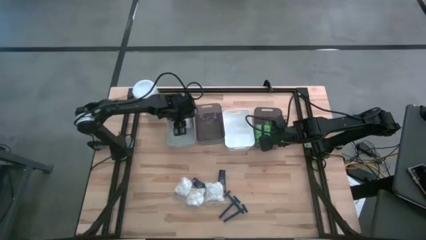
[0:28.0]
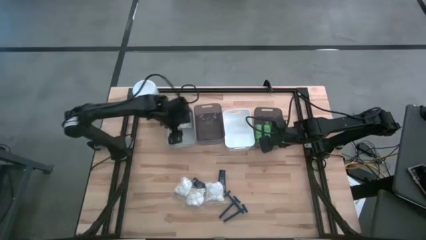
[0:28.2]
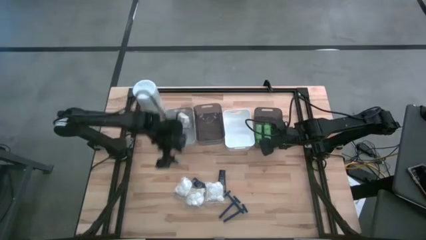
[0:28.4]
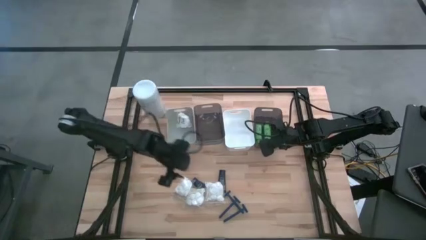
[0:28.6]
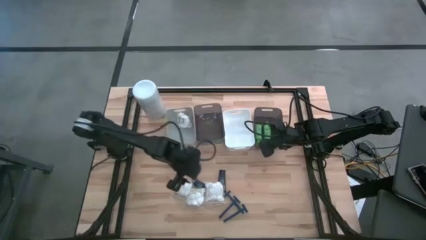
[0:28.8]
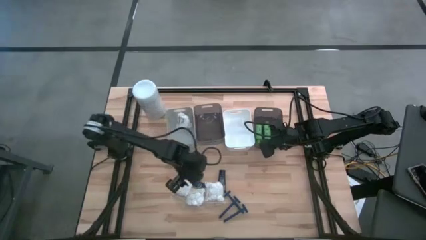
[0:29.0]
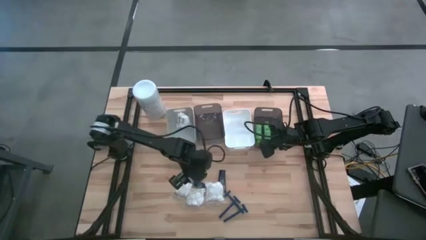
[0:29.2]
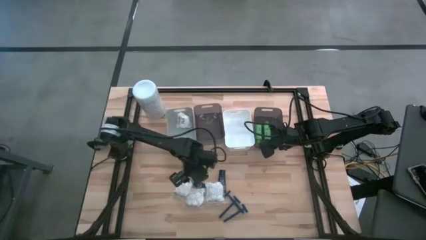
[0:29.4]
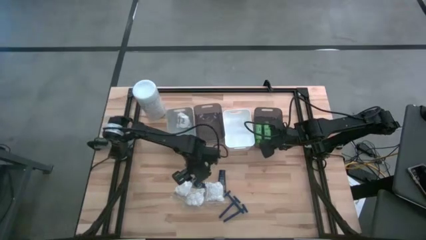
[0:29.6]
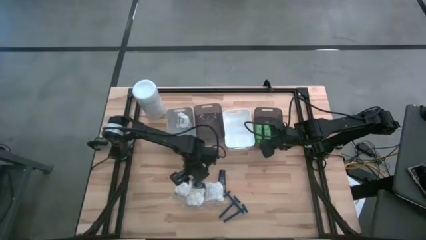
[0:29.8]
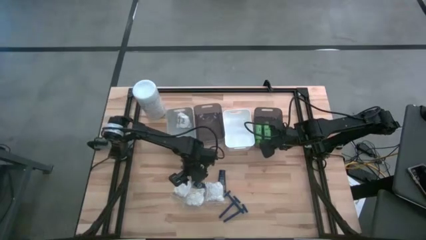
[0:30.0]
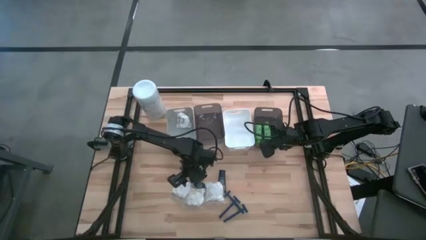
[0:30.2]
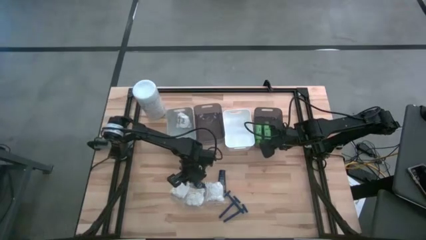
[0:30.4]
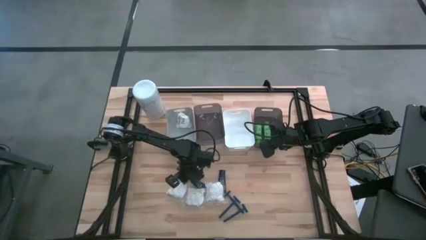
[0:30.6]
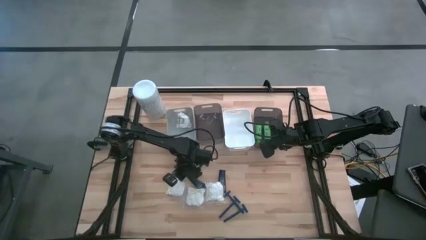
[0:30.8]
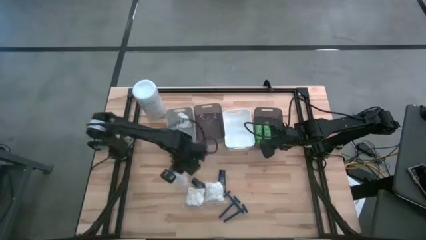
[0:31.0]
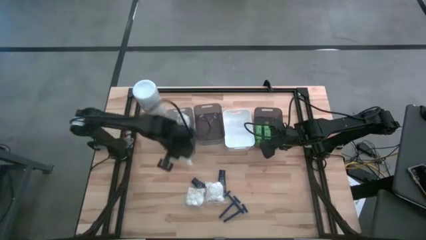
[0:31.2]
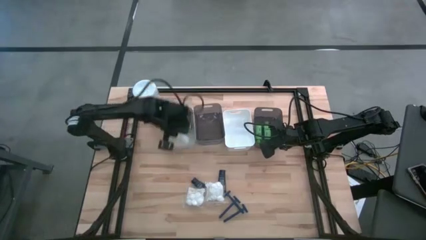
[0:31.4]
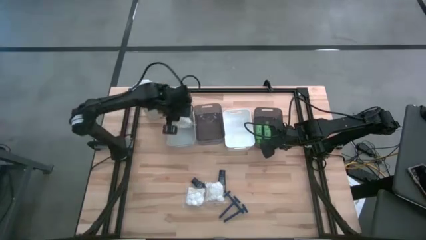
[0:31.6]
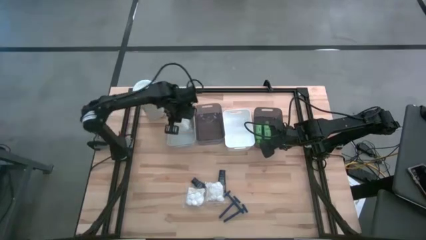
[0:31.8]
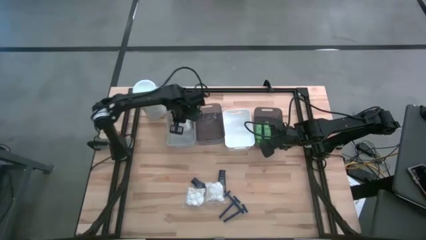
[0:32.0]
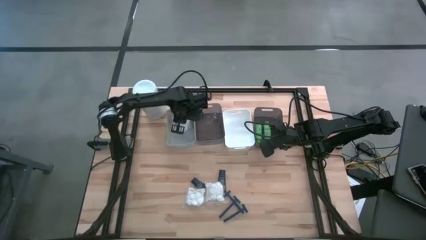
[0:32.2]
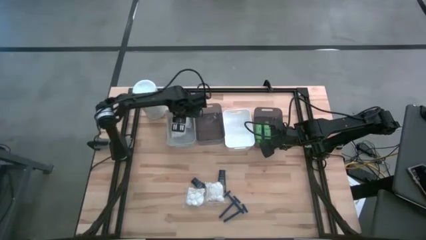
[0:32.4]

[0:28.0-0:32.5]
Task: Pick & Place Travel size toiletries
Put the left cotton pack in the left white bin

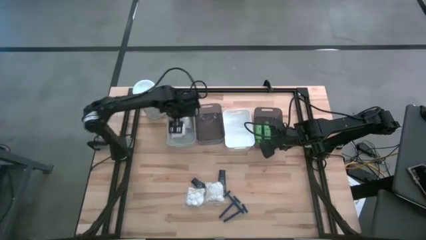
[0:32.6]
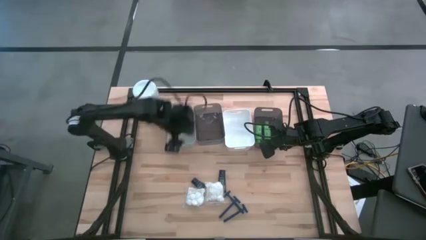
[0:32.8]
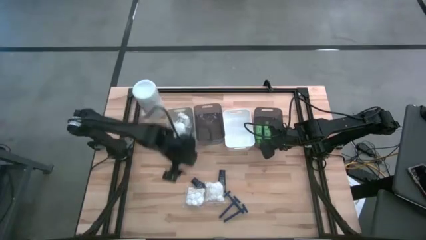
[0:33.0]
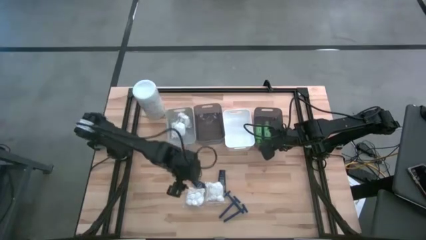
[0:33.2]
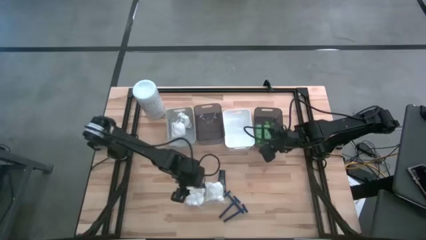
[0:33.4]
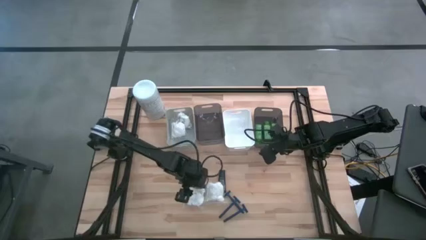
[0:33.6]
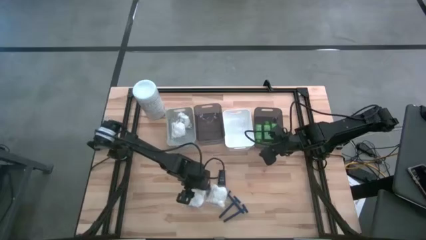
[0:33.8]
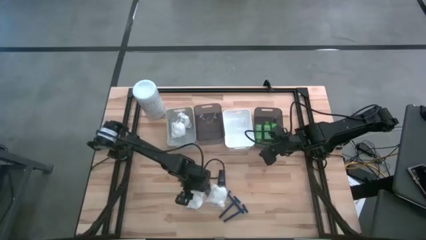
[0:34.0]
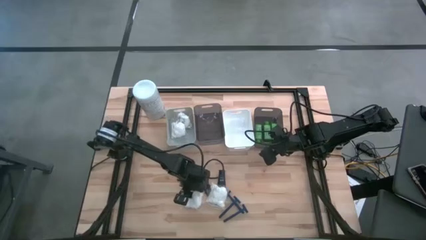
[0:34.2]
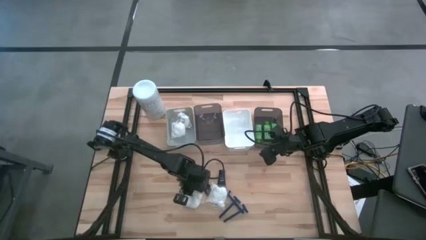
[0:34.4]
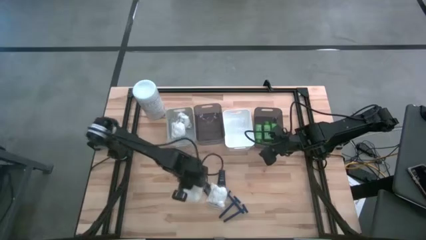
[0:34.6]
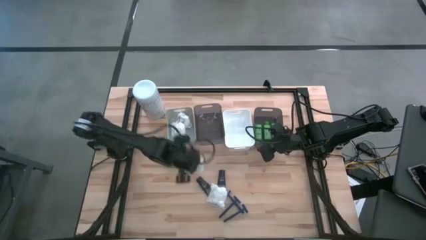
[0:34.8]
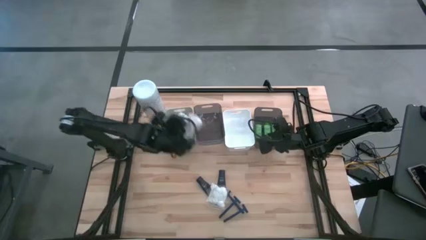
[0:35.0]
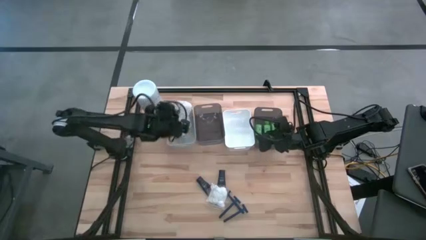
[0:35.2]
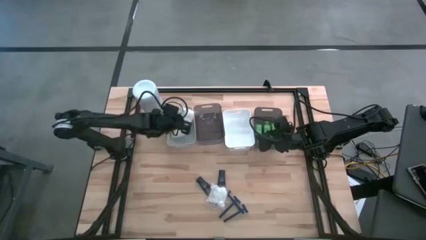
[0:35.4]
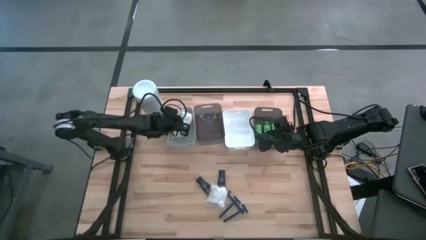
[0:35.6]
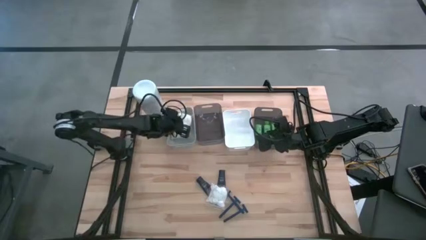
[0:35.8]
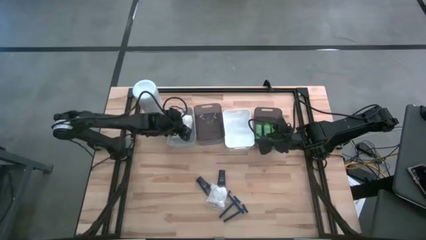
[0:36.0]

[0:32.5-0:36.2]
Put the left cotton pack in the left white bin

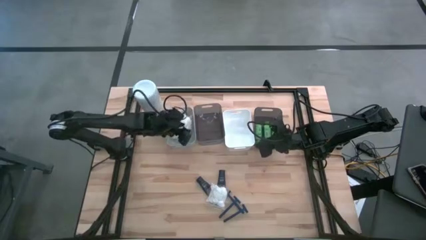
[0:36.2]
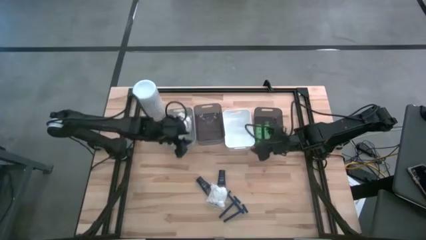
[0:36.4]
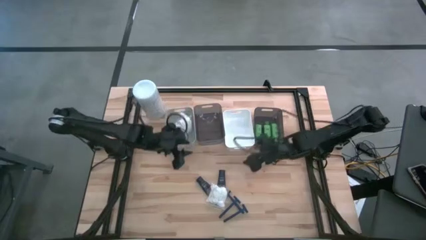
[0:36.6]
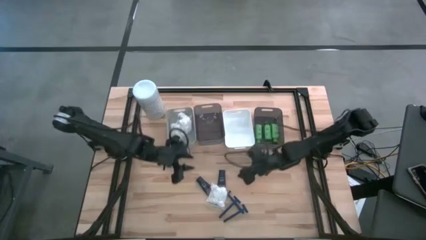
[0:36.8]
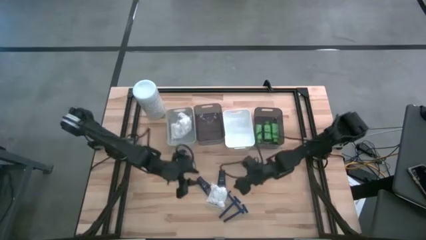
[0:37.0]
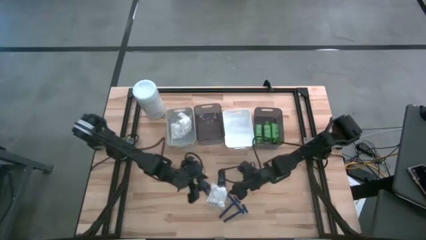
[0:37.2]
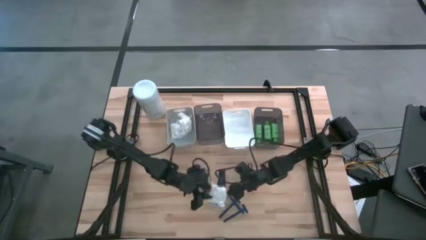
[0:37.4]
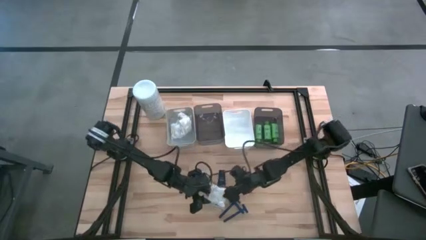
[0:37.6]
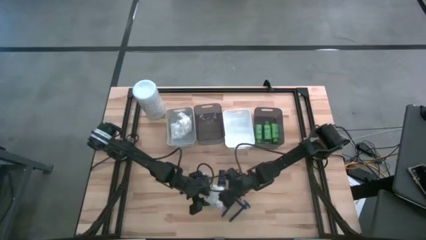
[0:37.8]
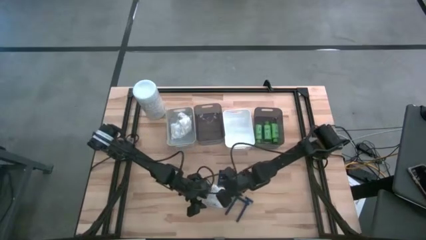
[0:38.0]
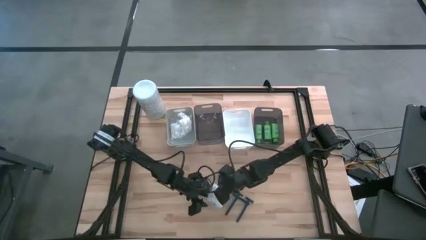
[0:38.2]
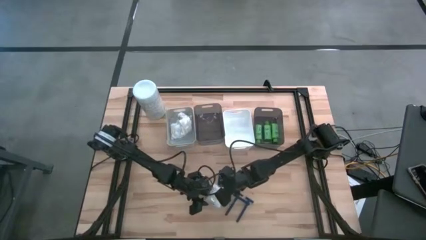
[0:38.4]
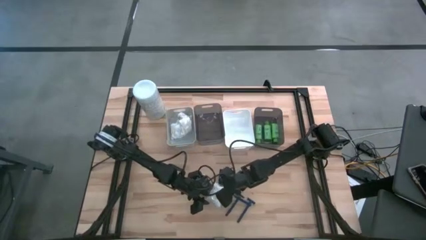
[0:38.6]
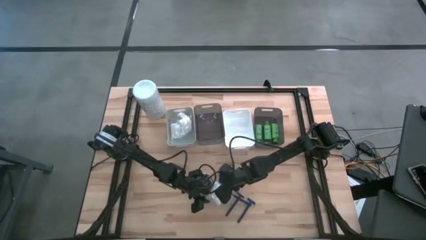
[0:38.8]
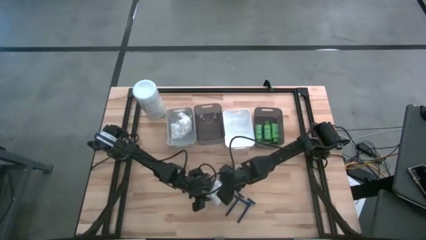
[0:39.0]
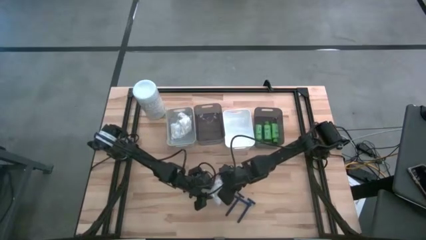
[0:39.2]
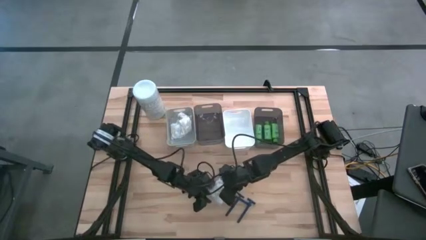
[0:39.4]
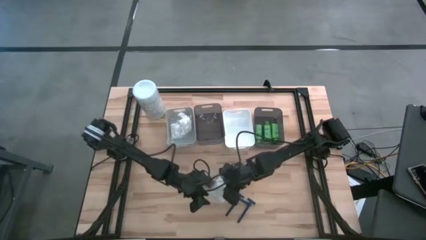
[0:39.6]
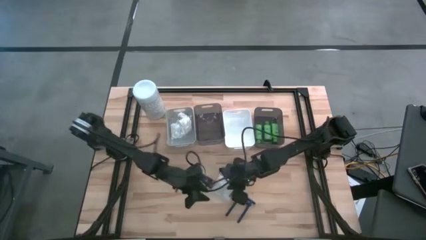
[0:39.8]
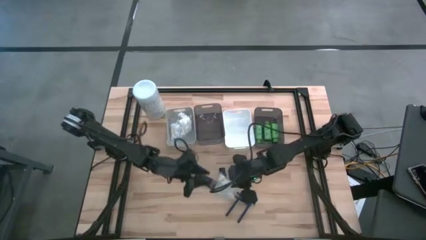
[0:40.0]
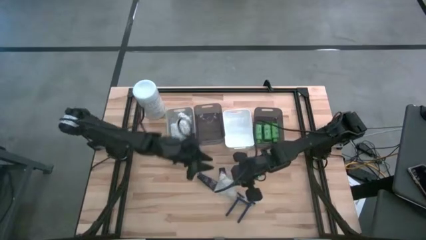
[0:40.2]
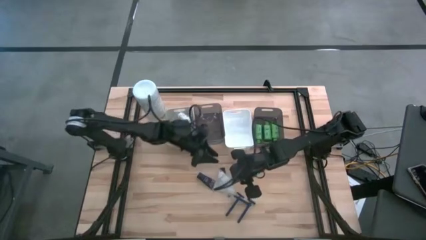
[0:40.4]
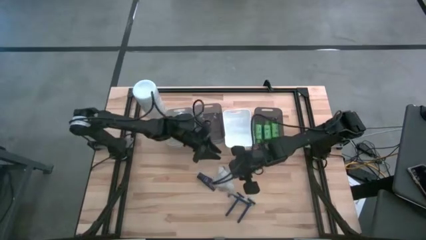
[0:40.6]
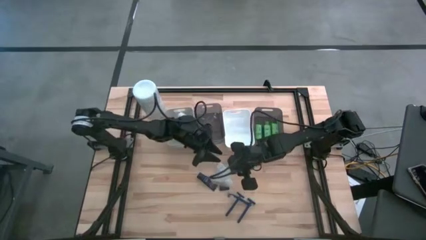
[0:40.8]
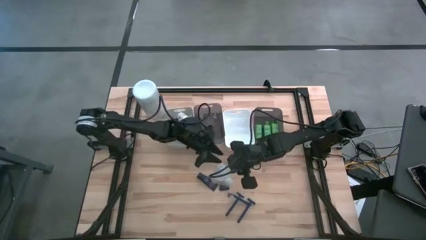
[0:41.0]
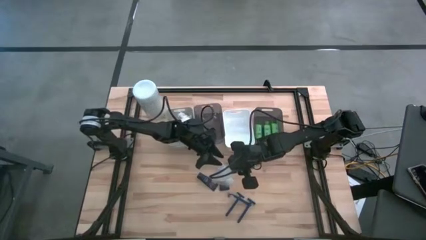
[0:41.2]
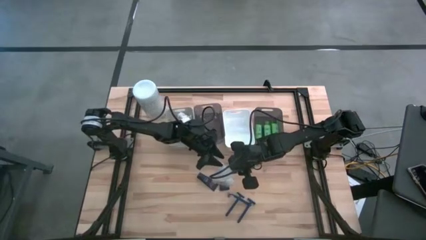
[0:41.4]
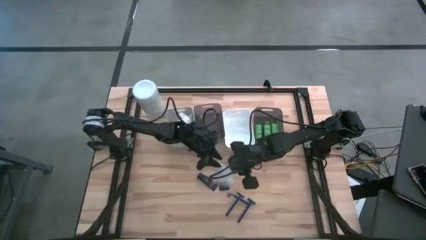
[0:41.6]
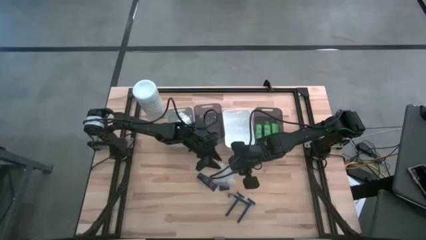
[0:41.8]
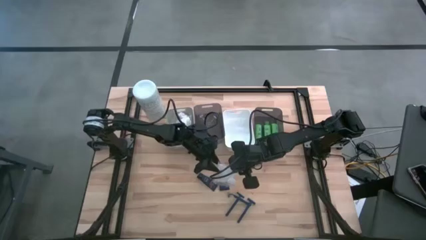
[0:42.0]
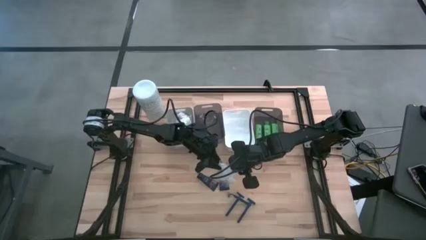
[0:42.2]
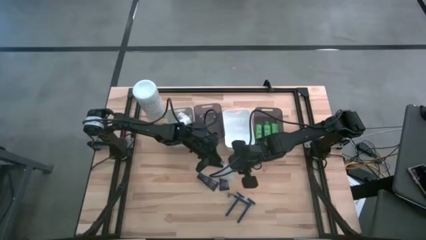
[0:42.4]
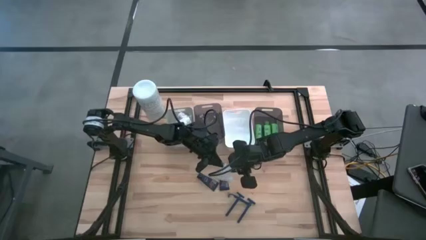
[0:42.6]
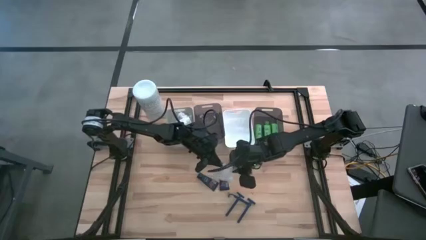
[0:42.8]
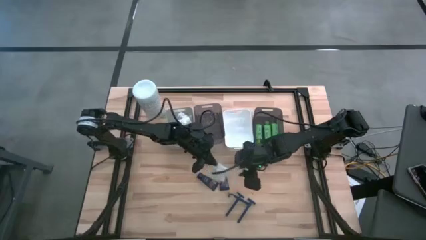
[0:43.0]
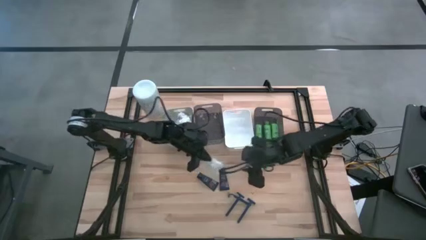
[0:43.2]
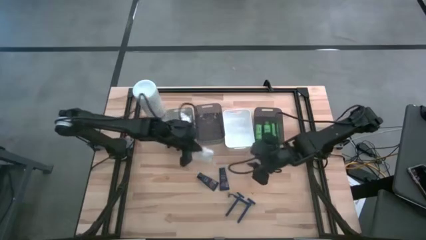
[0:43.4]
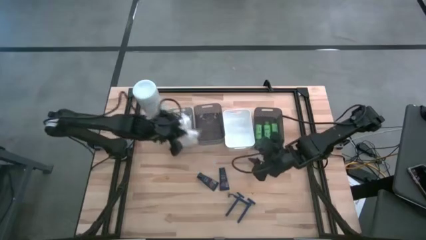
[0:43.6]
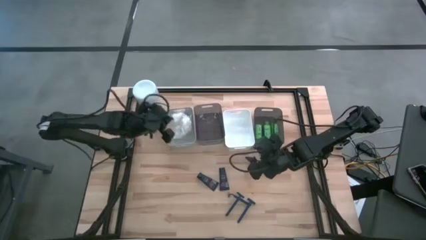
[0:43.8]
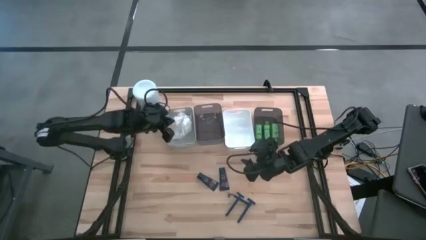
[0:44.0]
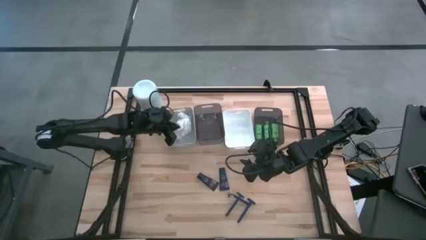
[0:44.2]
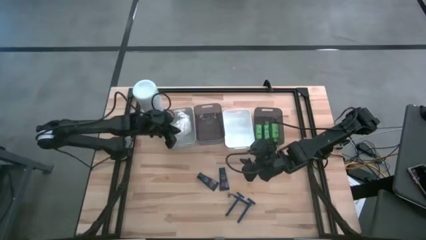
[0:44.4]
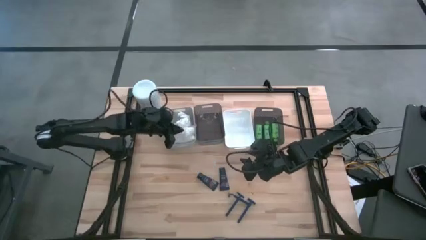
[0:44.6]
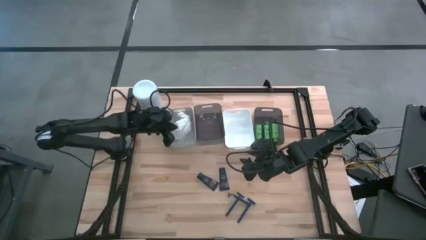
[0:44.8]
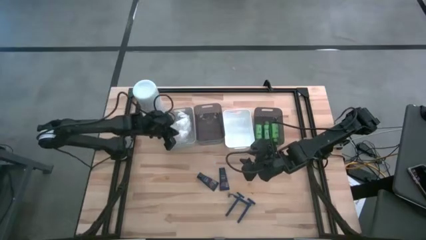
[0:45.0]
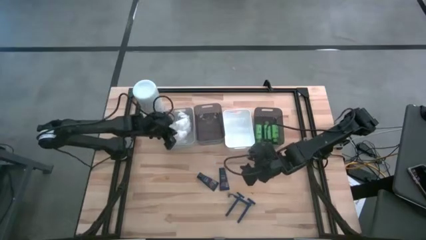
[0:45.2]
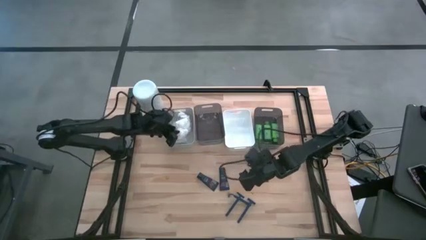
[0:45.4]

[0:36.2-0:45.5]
Put the cotton pack in the left white bin
